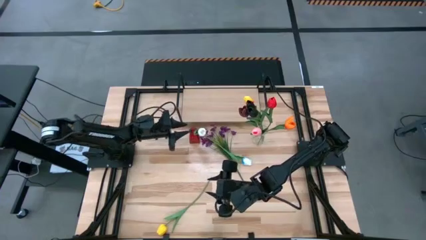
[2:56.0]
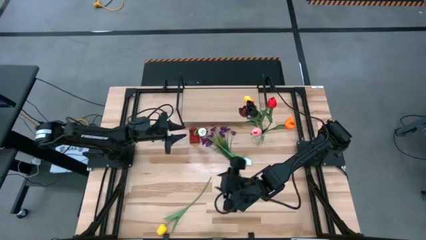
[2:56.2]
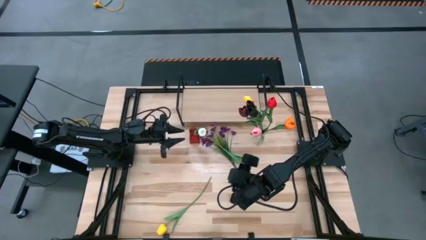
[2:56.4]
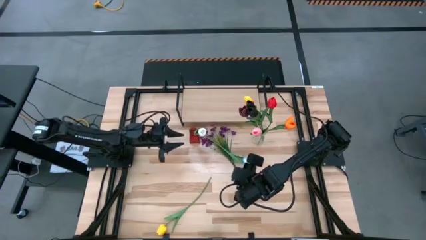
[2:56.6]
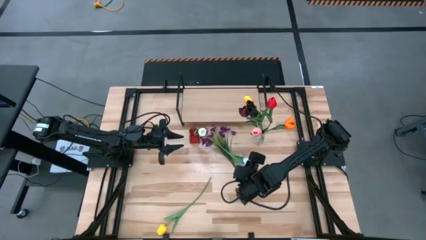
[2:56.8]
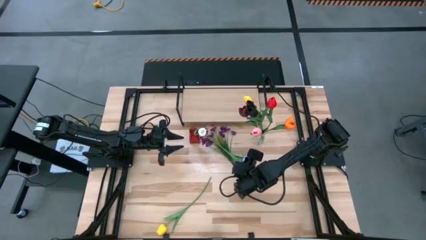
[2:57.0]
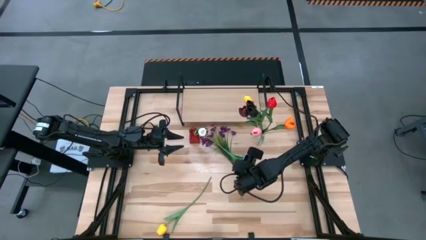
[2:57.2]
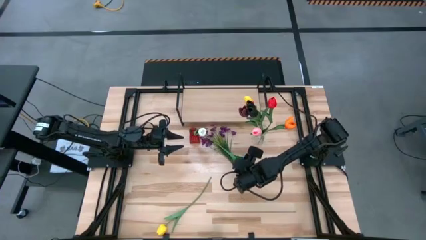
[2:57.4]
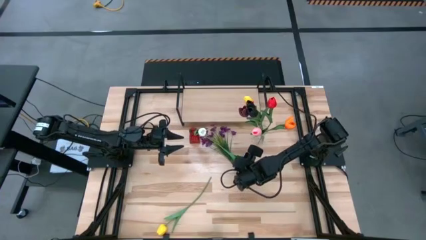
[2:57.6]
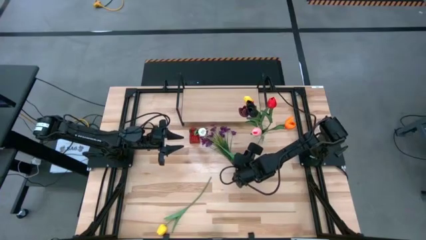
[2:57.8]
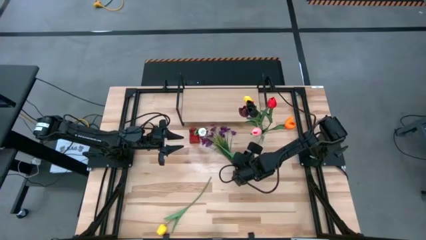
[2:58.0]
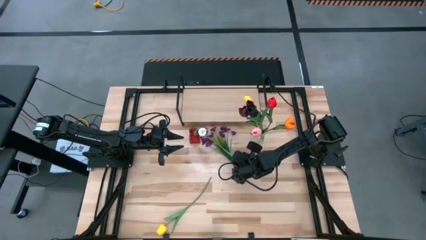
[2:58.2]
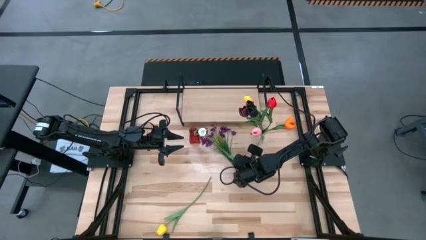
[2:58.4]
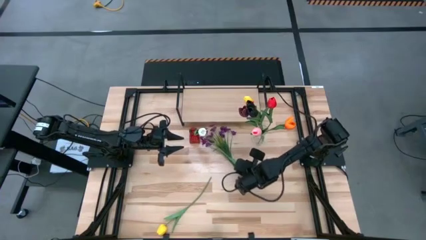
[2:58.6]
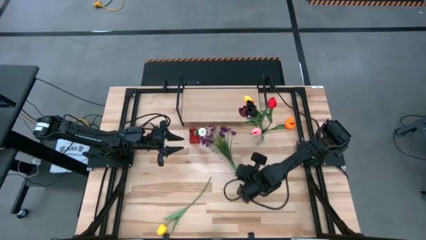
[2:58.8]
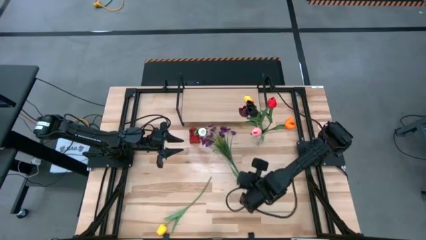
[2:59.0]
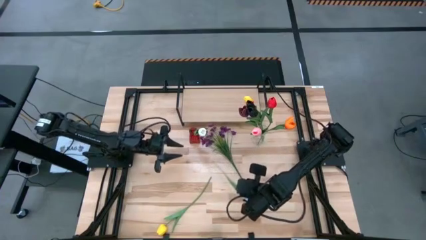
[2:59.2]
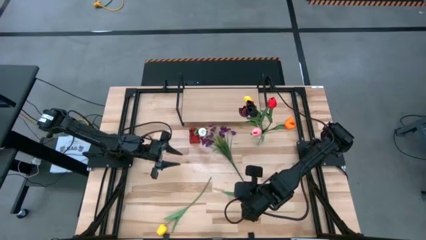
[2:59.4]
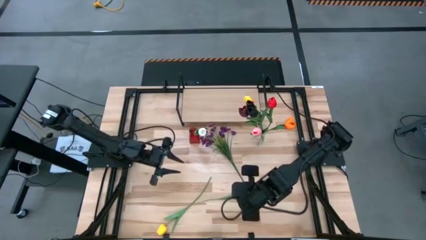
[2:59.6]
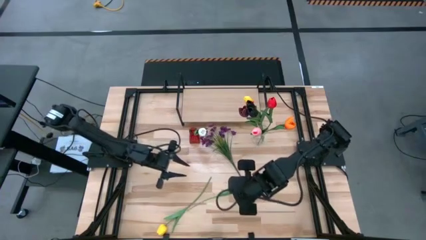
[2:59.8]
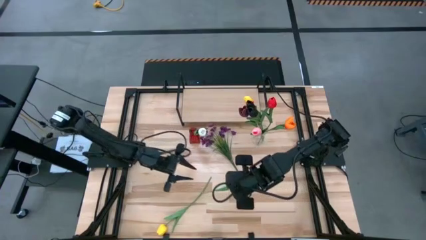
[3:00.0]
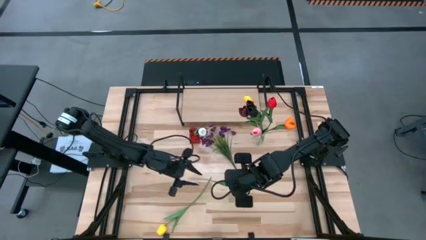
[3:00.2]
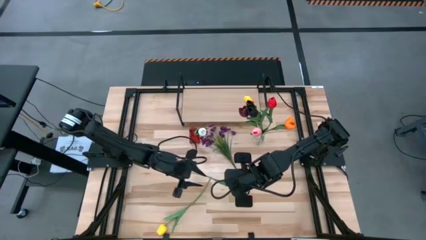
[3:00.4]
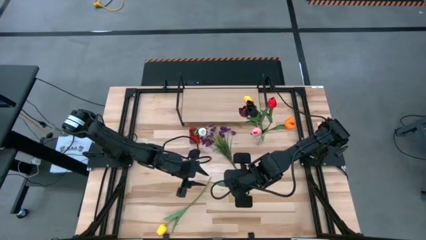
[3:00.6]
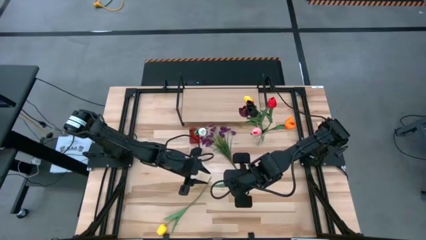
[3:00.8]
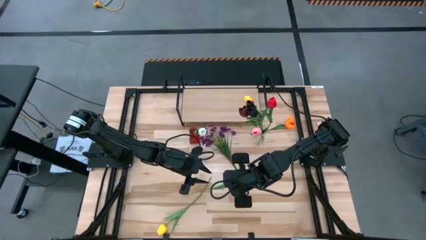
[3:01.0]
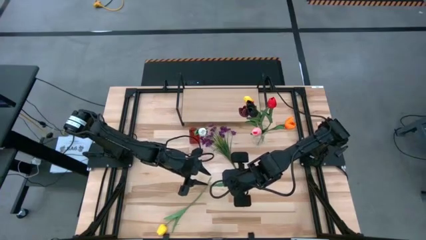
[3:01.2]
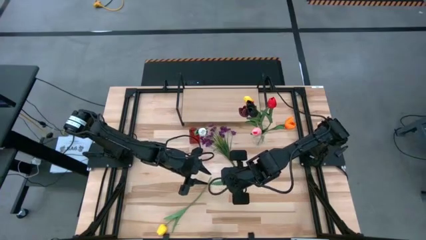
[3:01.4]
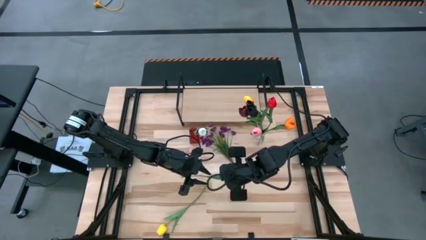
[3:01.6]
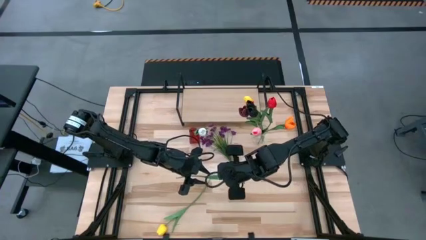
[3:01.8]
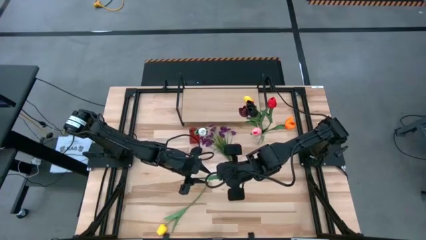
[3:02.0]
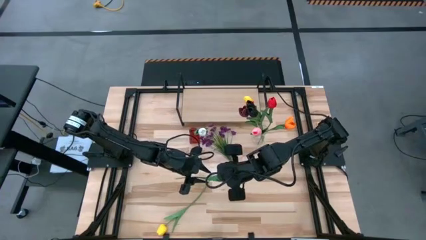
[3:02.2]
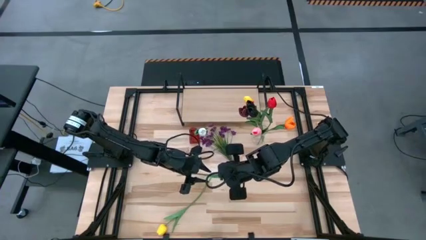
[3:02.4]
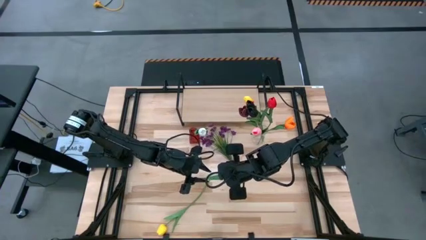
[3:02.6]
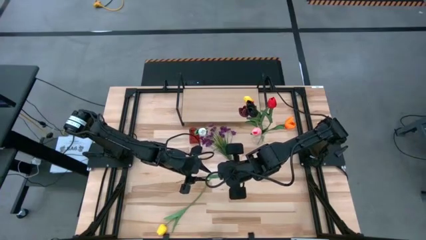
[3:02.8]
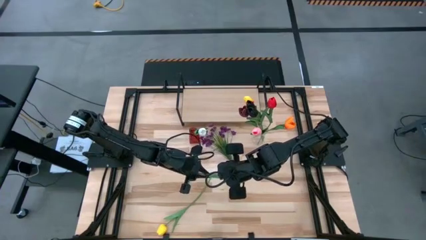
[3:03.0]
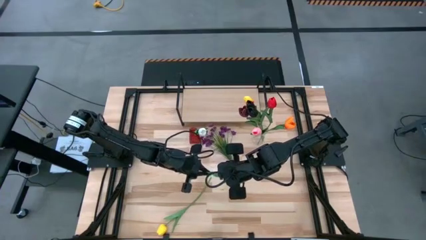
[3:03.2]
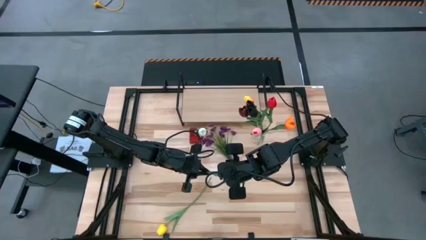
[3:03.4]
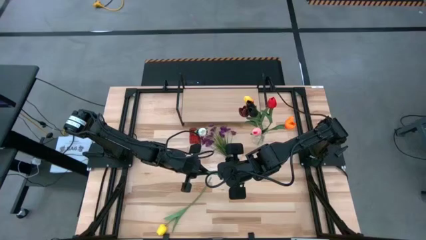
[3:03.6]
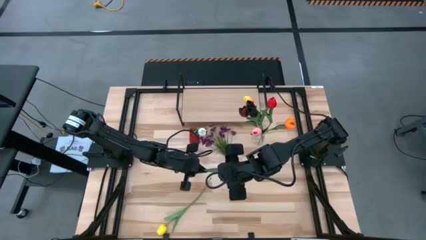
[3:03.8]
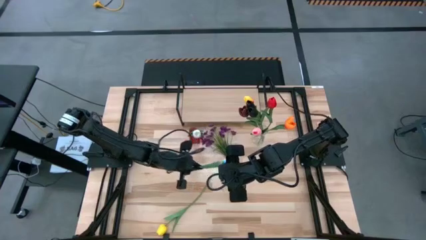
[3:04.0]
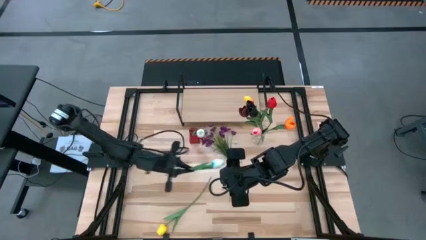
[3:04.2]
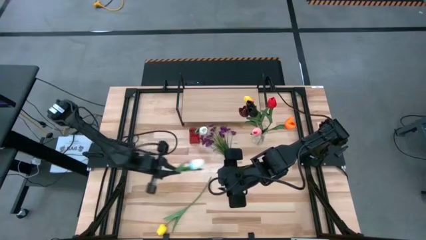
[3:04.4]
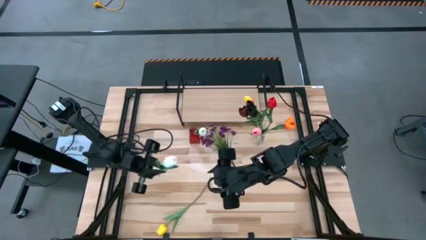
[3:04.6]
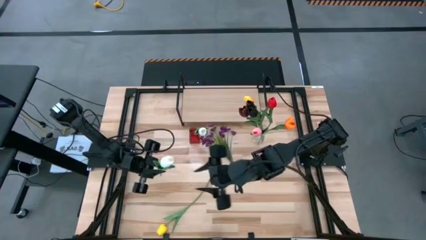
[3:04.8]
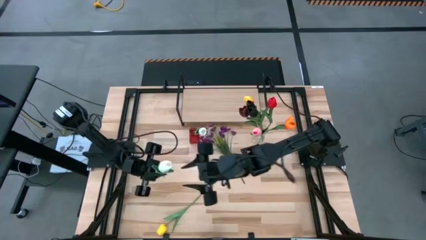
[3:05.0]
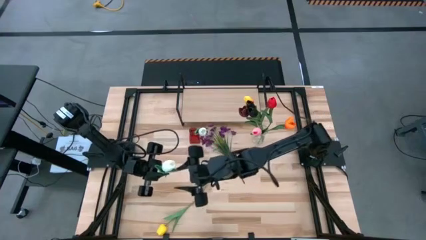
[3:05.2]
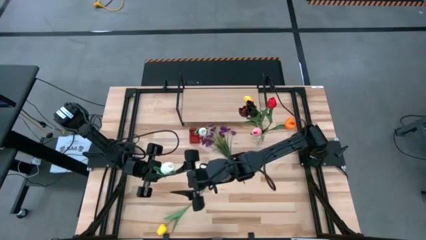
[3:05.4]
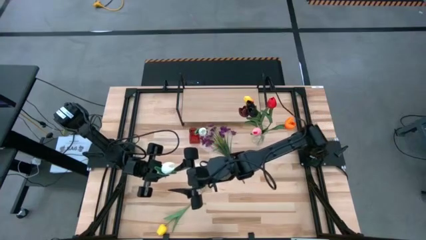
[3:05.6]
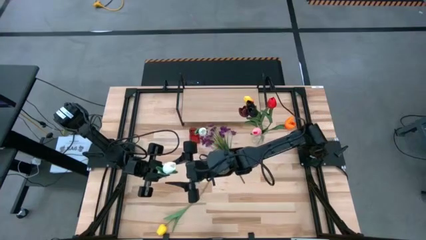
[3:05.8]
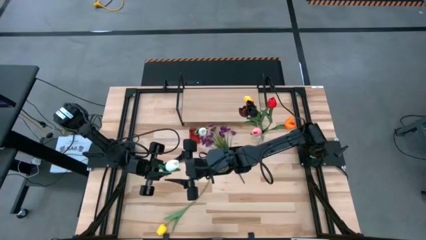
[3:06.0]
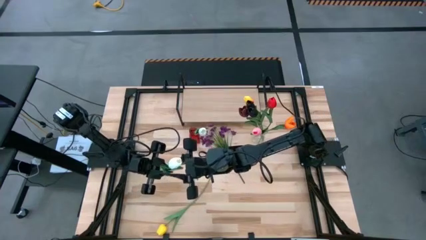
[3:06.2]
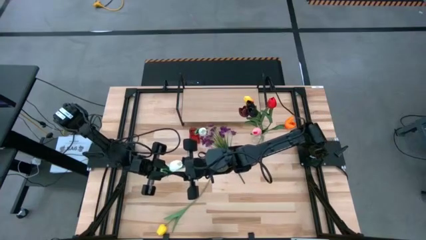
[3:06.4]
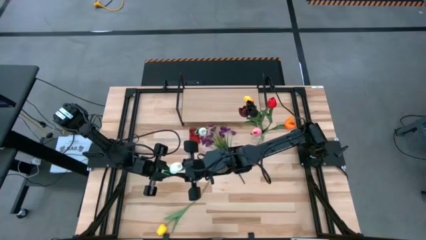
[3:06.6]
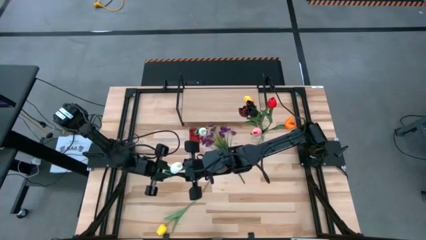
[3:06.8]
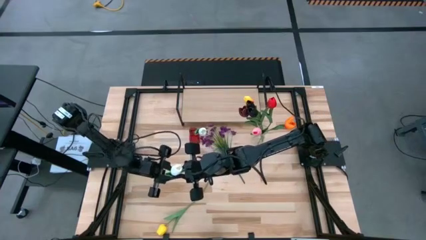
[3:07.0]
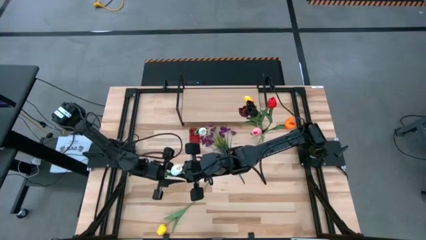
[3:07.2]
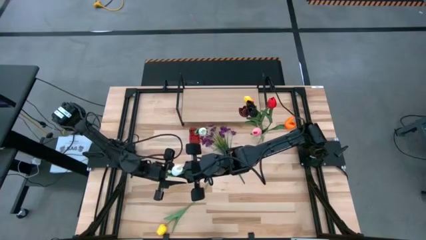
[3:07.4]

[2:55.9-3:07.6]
Task: Pick and place flowers into a vace then onto a shelf
Put the white flower into the red vase

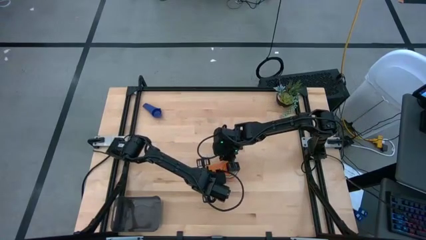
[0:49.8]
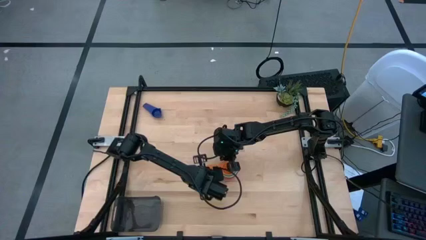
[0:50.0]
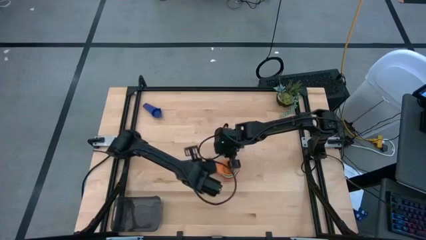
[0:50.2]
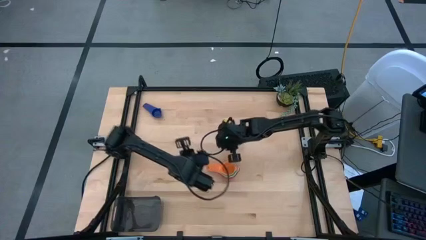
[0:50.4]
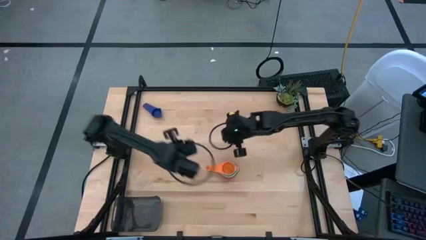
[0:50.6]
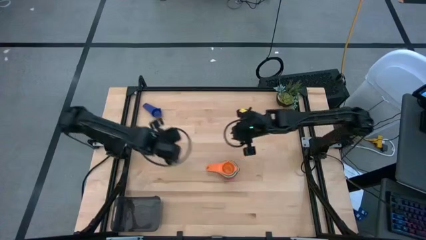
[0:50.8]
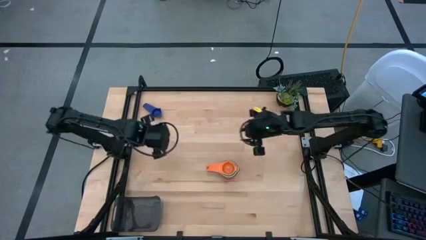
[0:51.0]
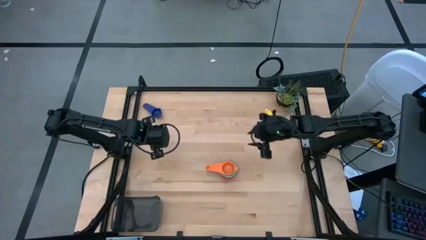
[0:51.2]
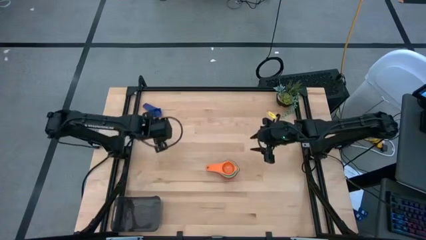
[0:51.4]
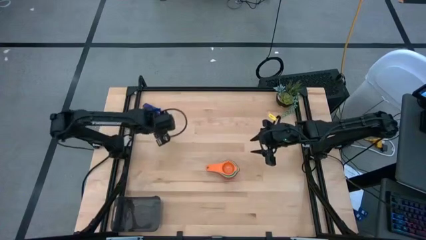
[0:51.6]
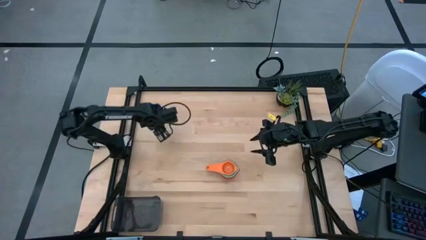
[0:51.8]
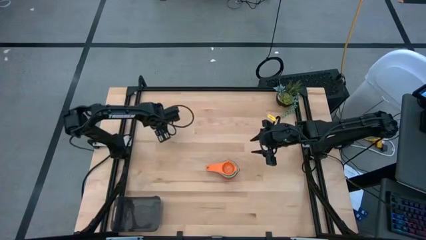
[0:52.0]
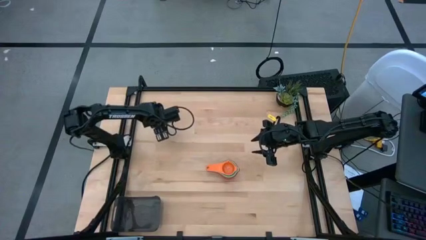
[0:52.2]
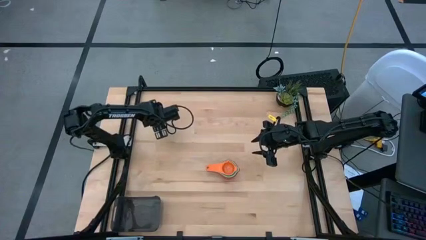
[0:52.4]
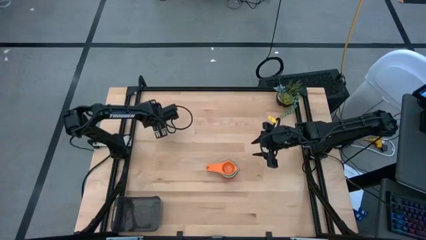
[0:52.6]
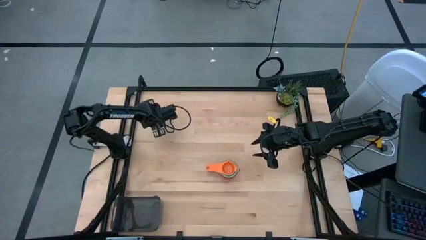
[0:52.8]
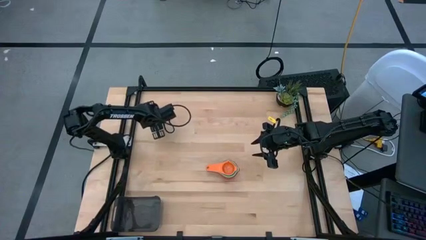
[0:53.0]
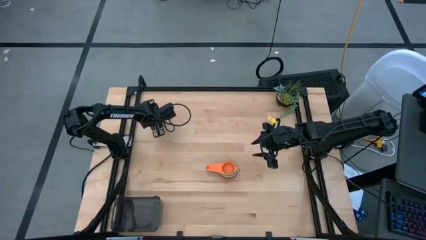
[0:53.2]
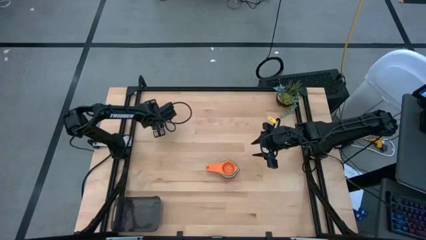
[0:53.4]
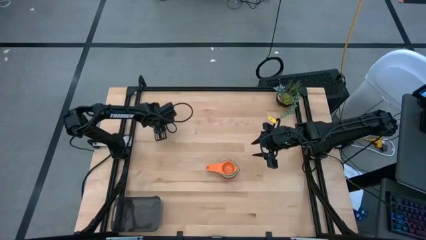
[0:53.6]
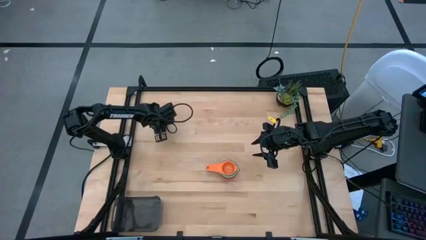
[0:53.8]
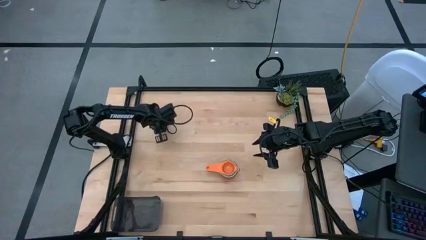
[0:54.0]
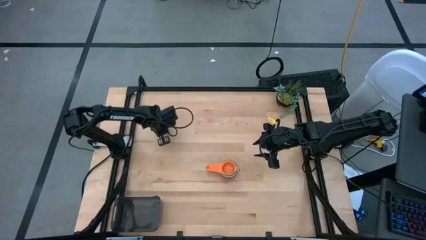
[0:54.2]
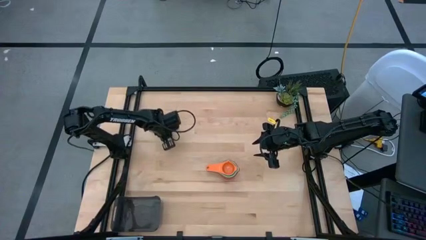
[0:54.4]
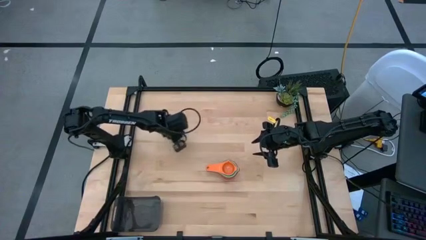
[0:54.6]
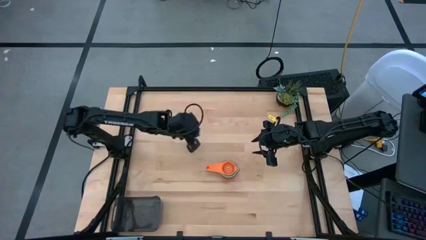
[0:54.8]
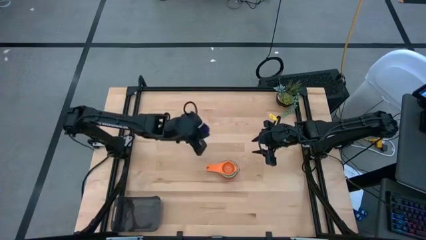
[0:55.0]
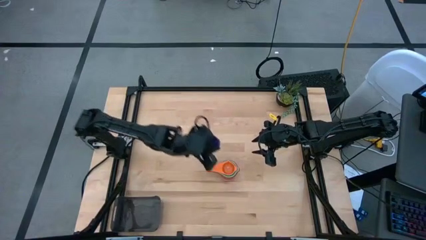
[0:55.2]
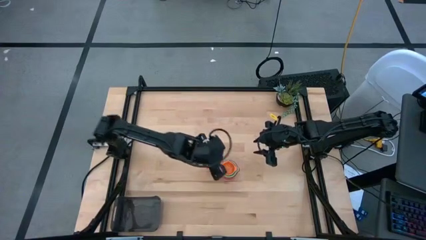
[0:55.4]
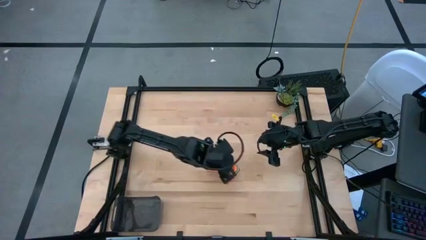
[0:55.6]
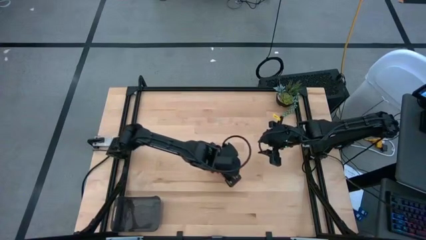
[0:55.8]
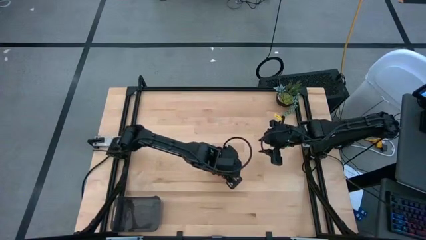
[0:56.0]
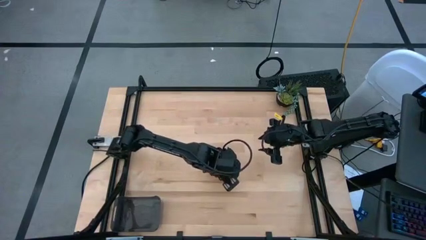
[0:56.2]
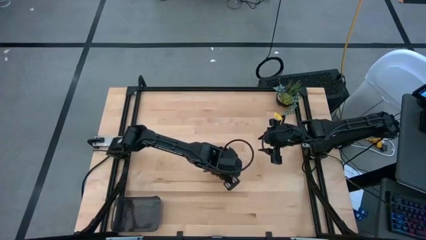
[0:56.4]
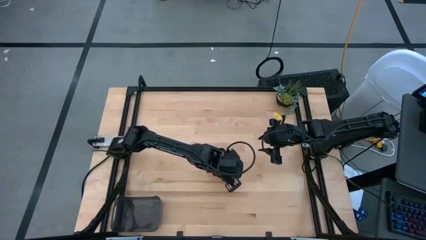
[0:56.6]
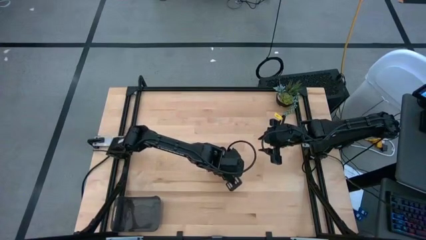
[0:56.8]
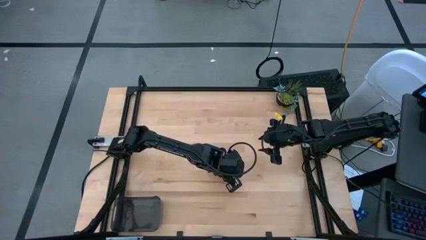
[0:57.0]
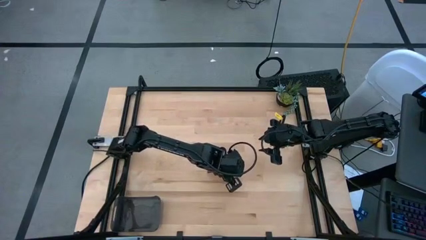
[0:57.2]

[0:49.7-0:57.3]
Task: Nest measuring cups in basket
Stack the dark blue measuring cup on top of the orange measuring cup
